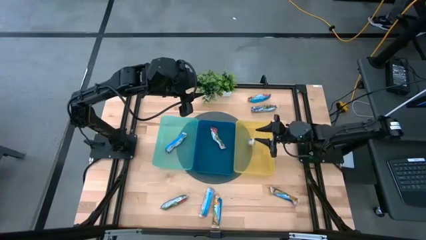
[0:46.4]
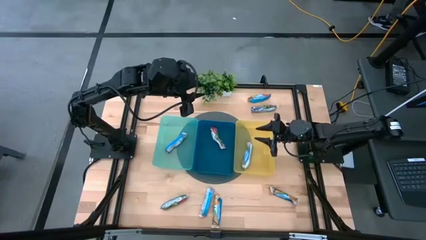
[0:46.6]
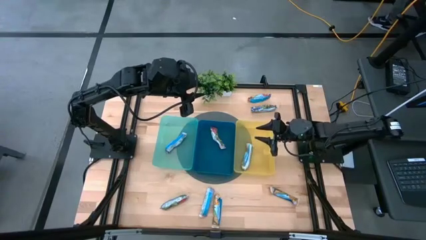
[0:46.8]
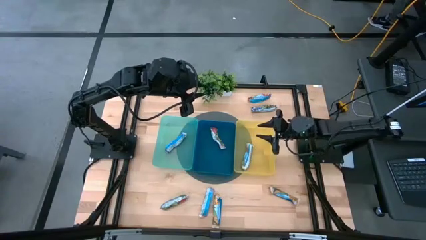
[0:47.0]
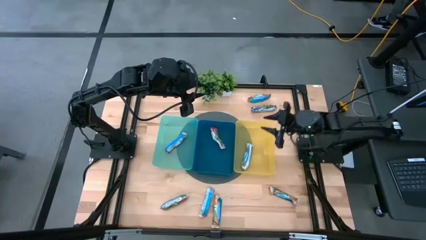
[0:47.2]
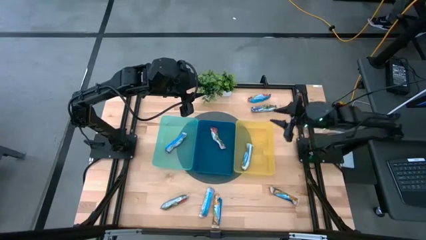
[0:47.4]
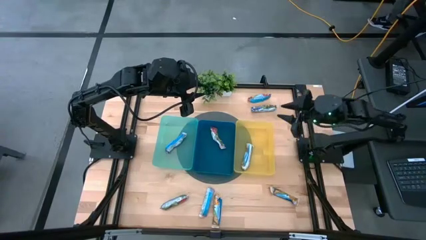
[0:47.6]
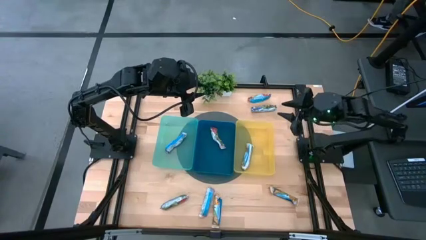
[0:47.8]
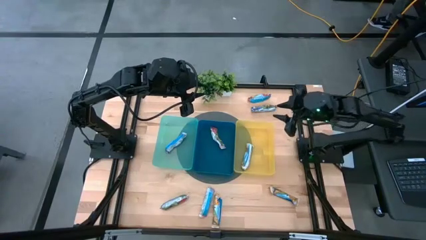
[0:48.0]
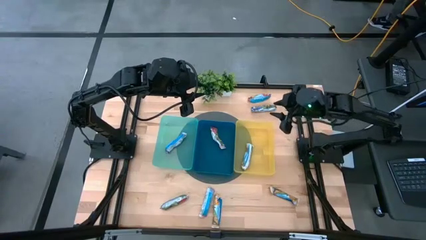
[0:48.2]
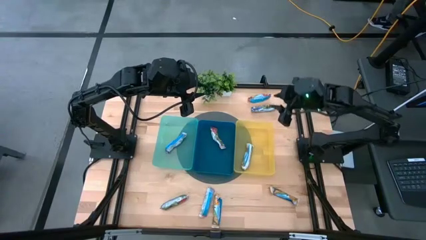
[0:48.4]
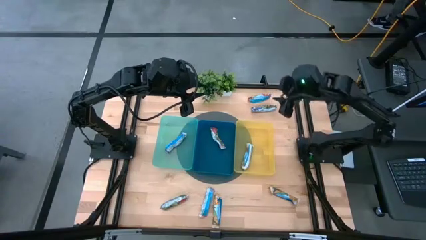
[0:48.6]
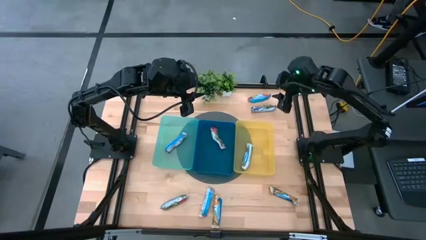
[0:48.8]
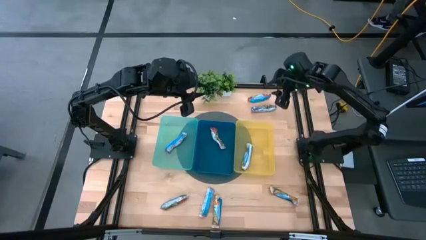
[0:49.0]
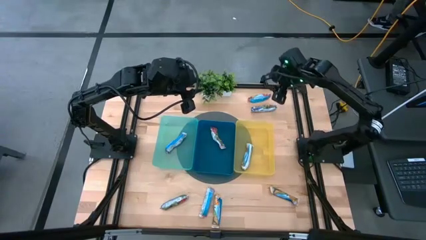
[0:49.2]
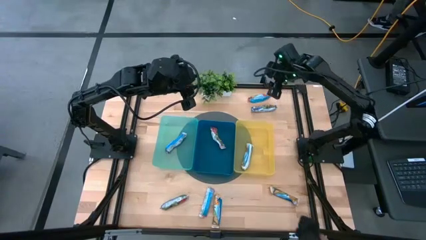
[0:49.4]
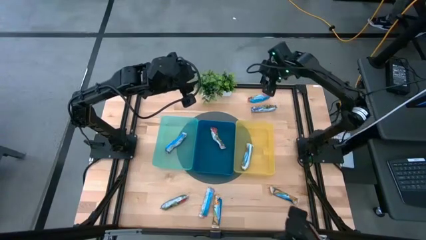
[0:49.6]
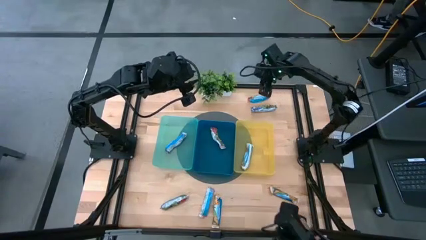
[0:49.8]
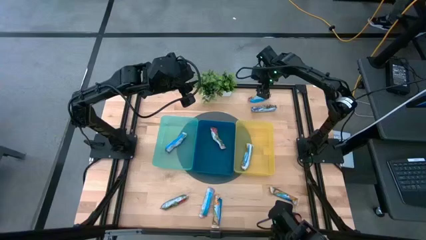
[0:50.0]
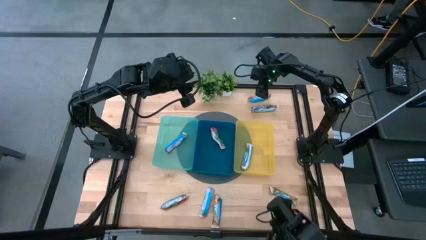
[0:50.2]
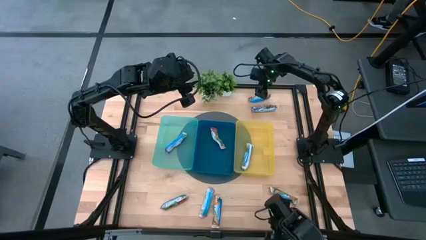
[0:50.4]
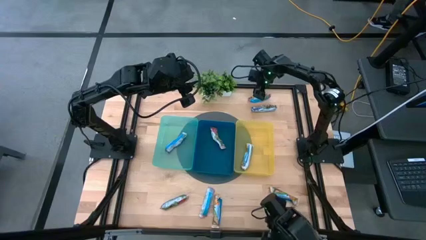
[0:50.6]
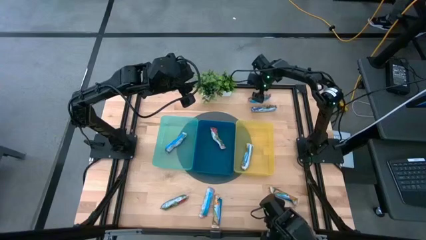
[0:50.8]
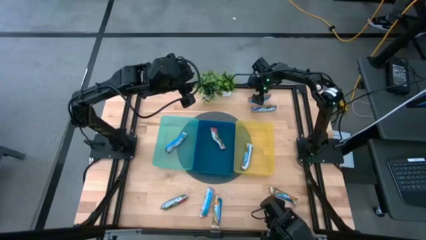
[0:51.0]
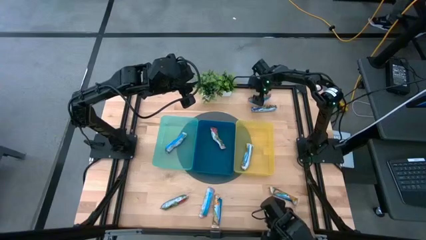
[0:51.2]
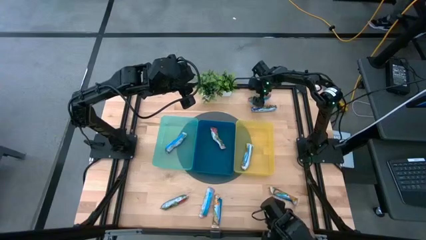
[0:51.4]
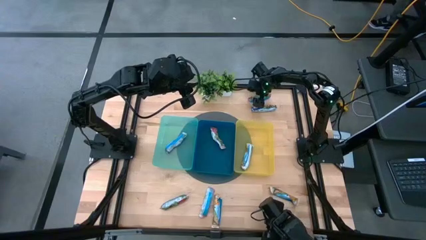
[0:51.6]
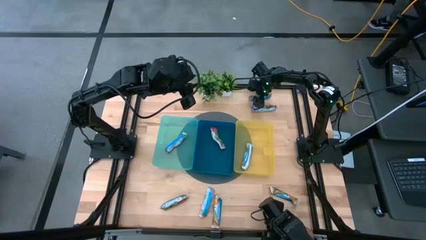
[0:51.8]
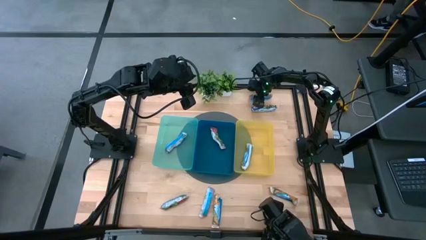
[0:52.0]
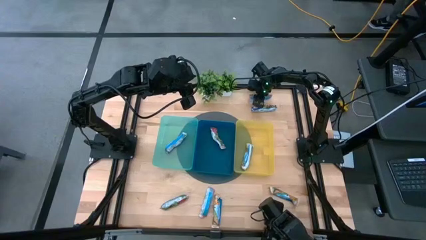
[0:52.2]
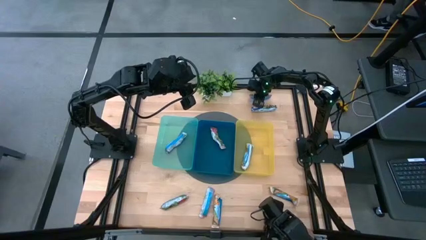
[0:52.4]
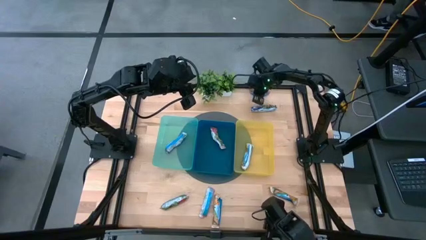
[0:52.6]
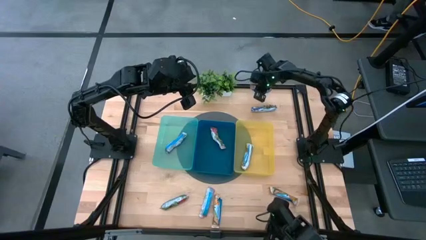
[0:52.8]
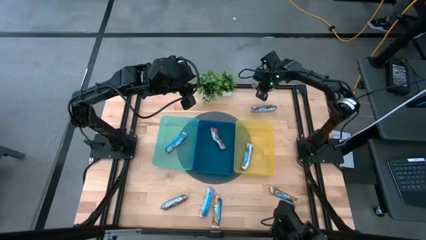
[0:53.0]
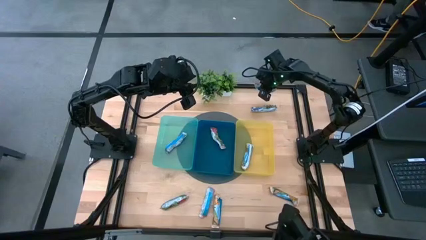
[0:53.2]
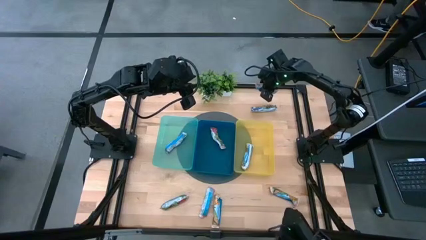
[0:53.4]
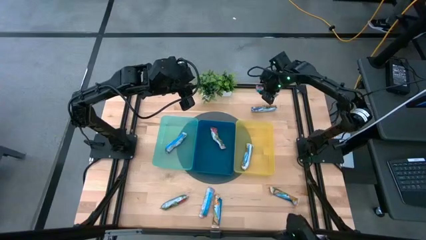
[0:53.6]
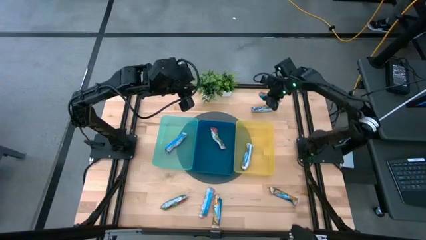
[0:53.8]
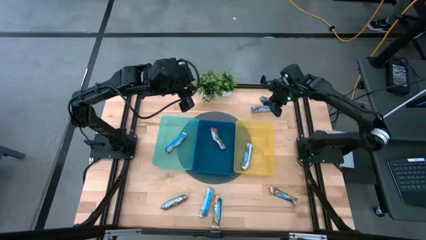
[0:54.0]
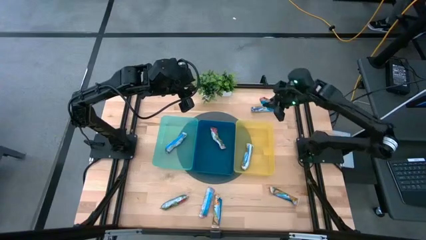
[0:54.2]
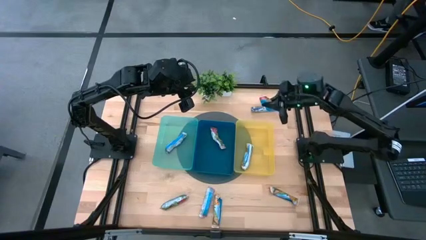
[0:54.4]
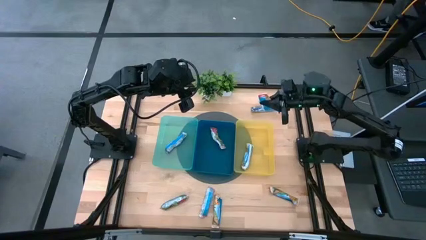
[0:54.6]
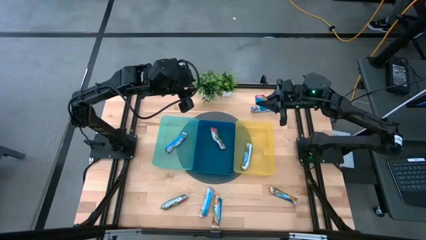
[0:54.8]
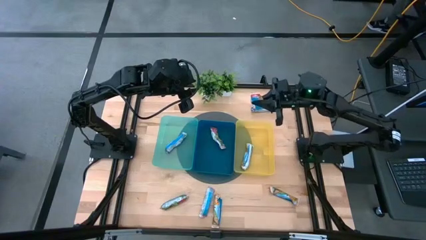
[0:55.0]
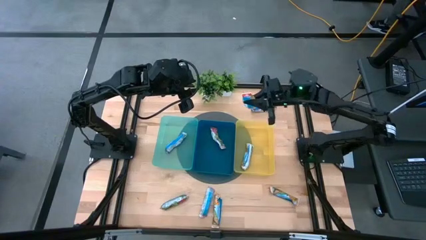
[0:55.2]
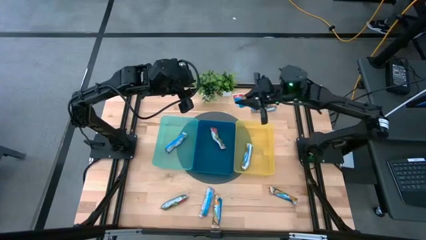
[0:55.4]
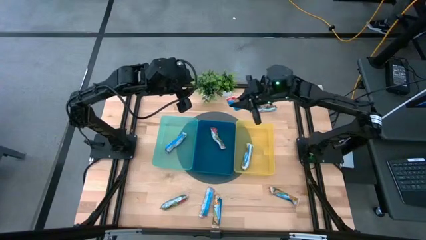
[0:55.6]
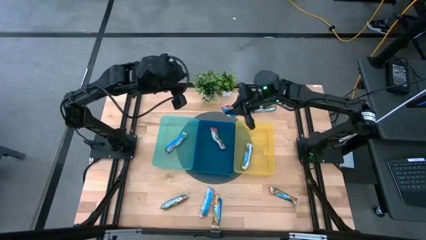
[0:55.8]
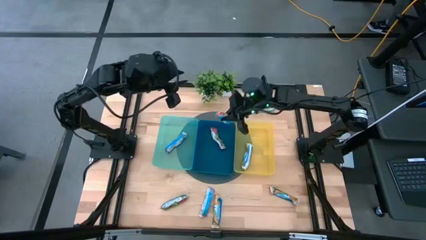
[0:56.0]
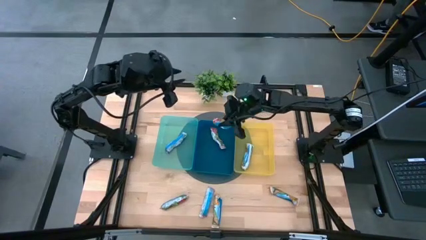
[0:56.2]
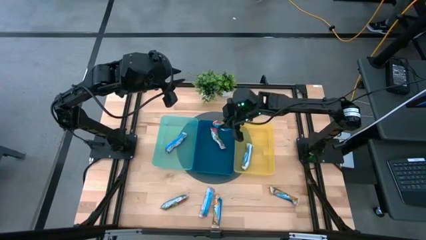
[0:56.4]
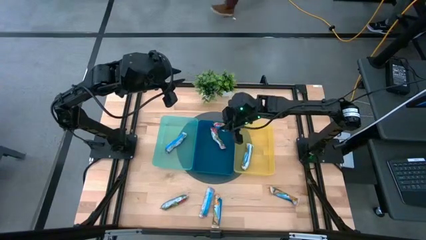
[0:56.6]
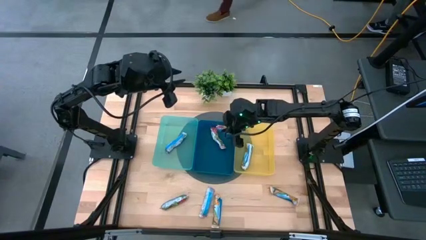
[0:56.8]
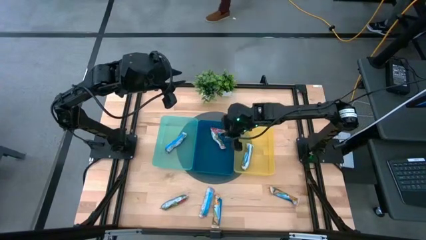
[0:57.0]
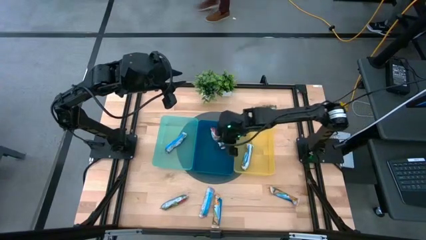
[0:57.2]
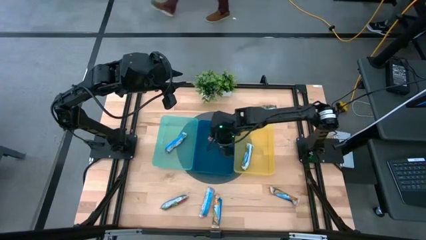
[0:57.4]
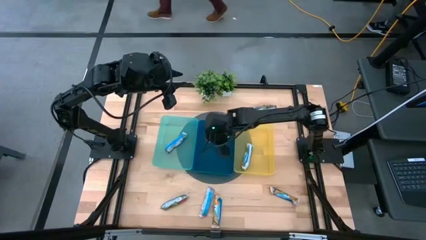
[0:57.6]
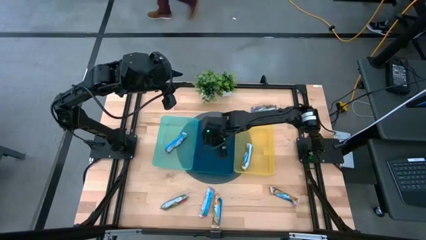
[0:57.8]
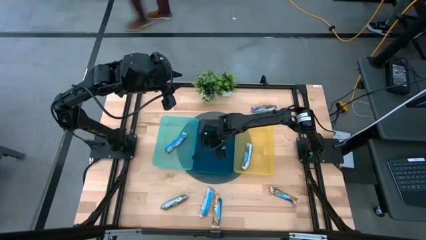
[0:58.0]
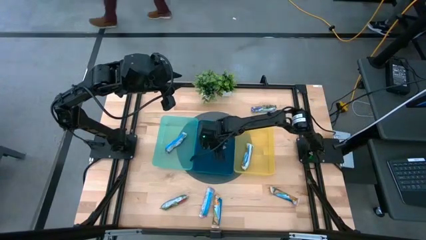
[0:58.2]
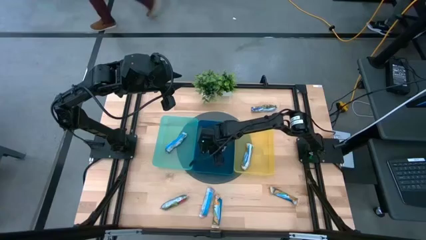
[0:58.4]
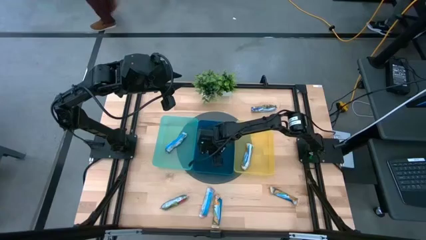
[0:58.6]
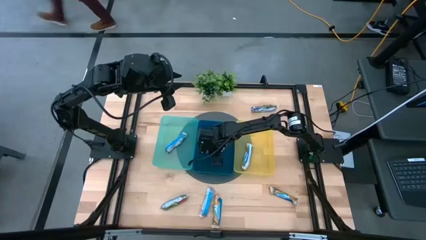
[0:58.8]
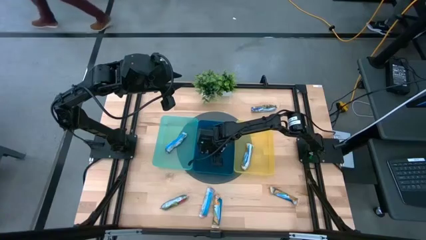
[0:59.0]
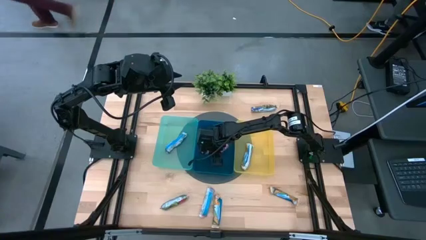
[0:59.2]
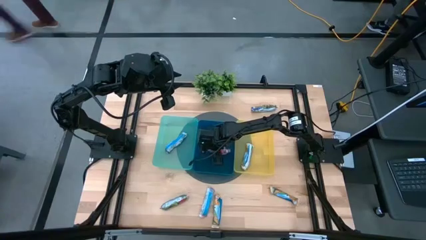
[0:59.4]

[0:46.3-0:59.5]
Task: Pick and place Granola Bars by type
Put the red granola bar into the blue bin
